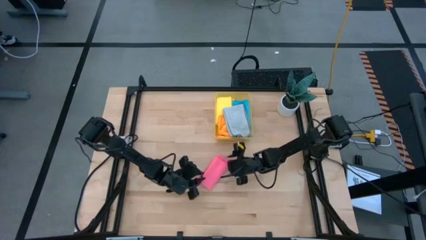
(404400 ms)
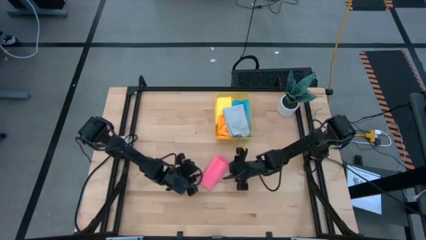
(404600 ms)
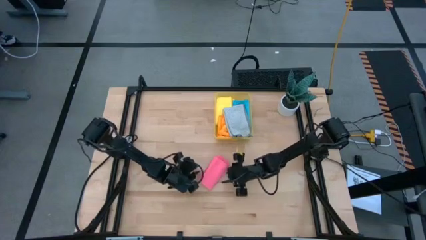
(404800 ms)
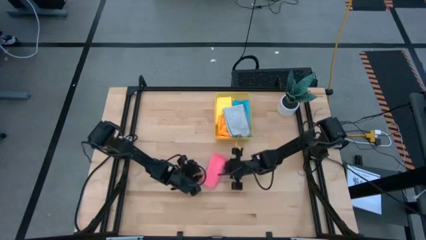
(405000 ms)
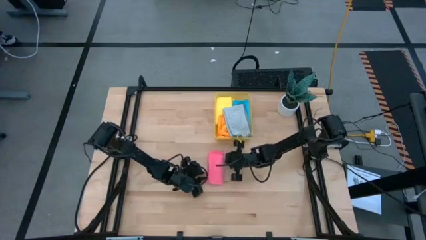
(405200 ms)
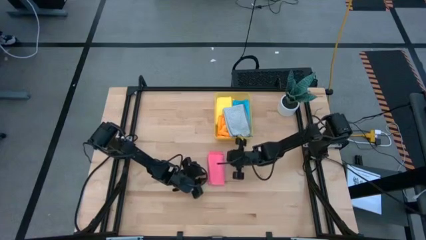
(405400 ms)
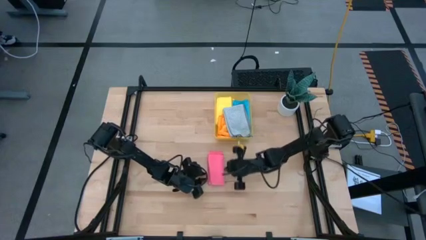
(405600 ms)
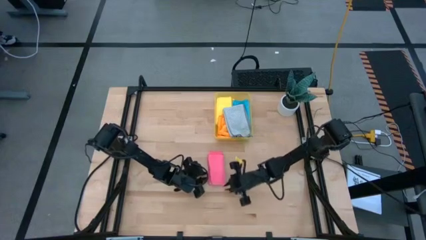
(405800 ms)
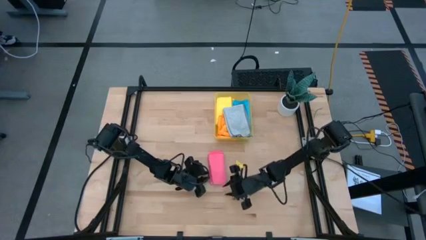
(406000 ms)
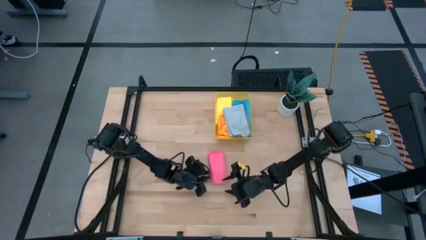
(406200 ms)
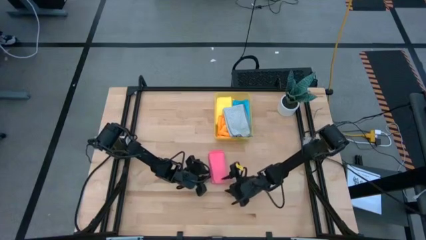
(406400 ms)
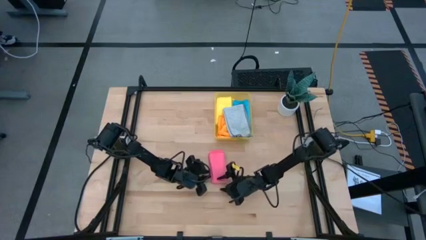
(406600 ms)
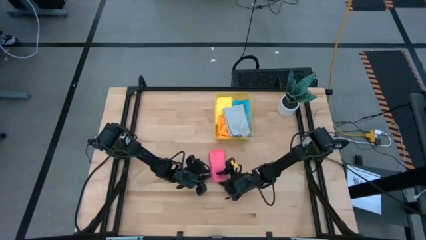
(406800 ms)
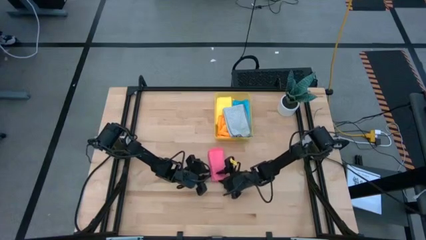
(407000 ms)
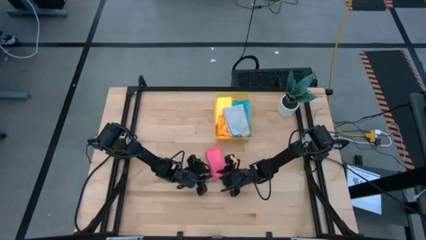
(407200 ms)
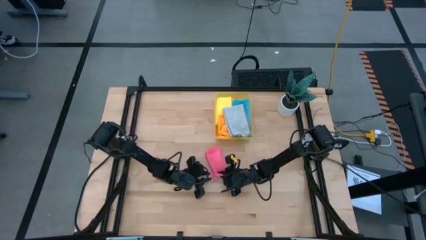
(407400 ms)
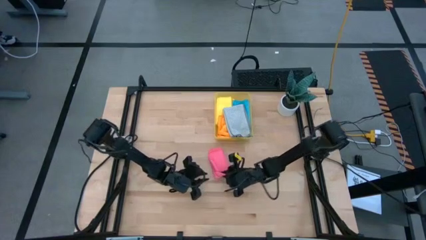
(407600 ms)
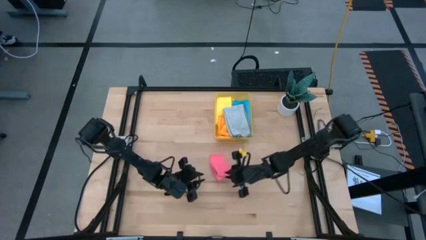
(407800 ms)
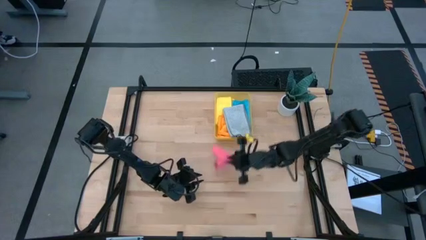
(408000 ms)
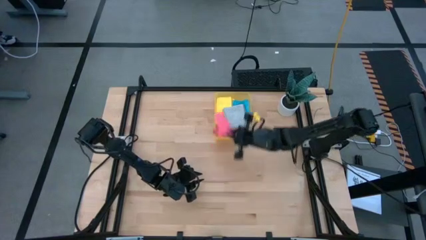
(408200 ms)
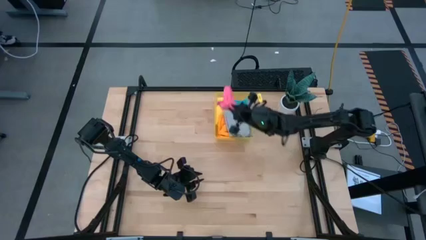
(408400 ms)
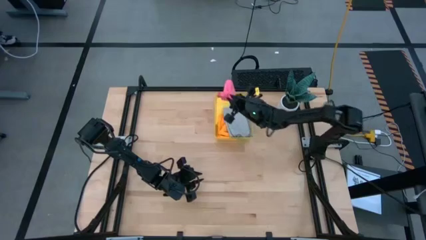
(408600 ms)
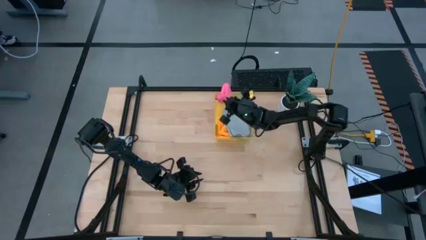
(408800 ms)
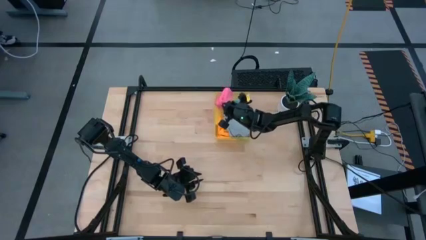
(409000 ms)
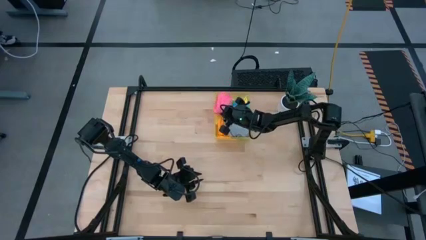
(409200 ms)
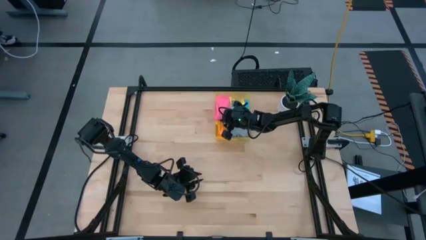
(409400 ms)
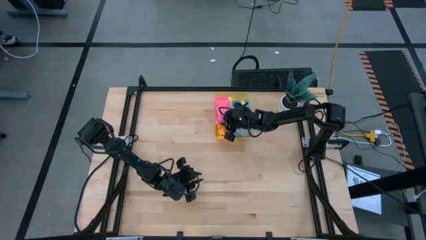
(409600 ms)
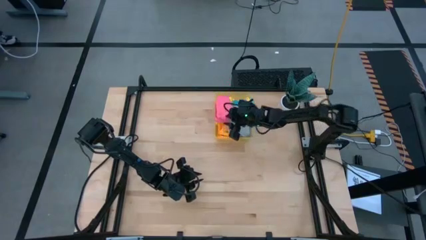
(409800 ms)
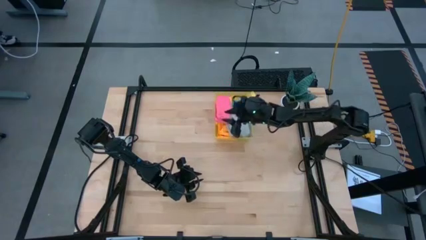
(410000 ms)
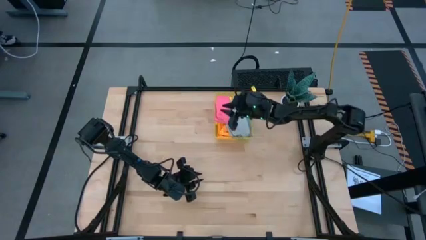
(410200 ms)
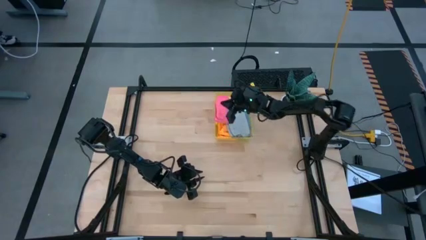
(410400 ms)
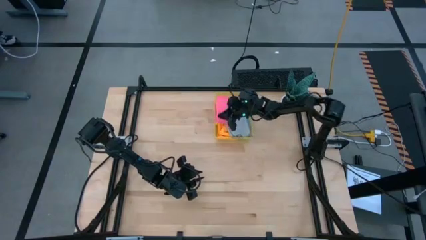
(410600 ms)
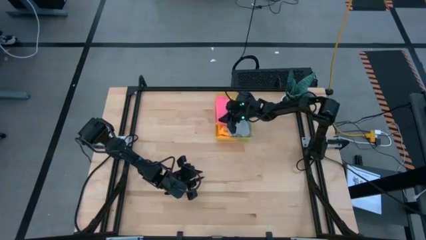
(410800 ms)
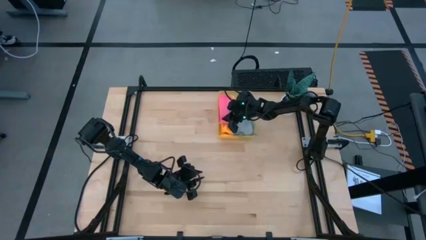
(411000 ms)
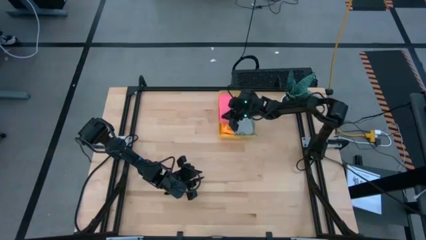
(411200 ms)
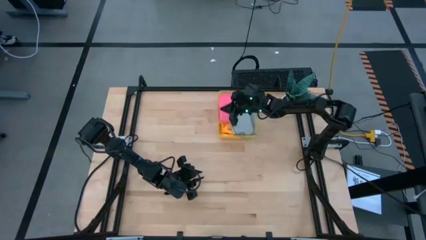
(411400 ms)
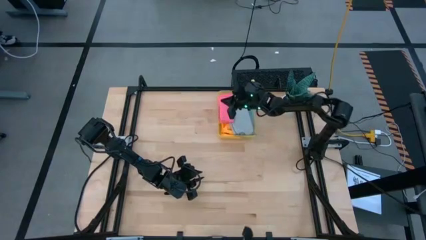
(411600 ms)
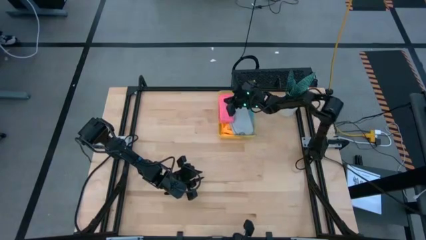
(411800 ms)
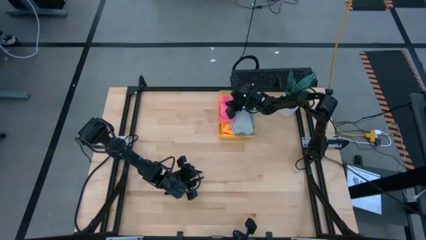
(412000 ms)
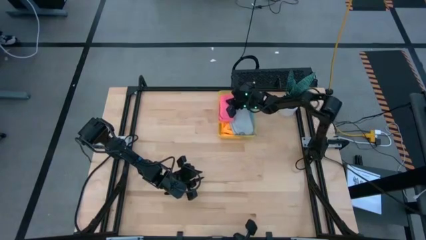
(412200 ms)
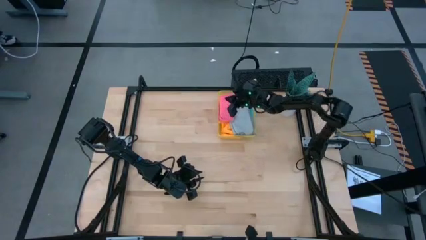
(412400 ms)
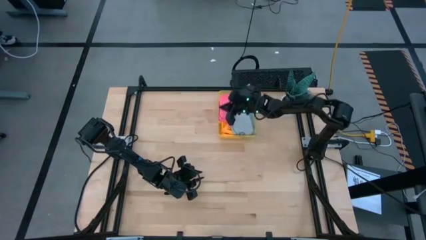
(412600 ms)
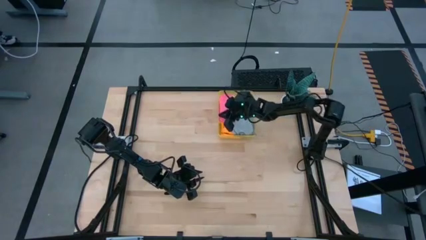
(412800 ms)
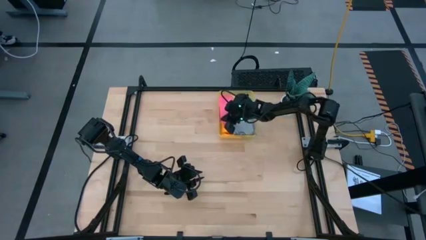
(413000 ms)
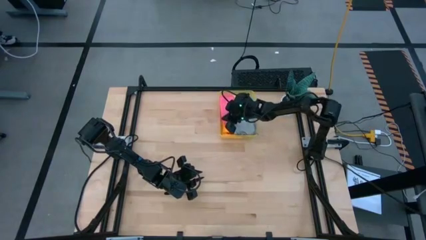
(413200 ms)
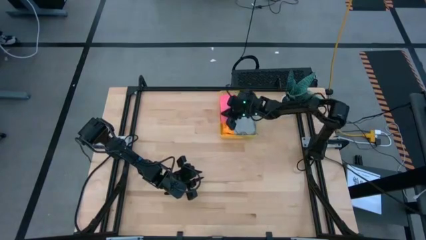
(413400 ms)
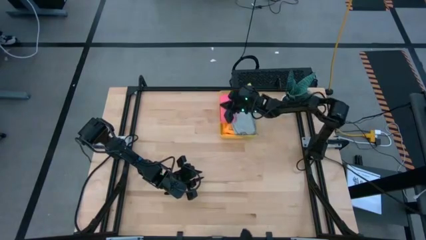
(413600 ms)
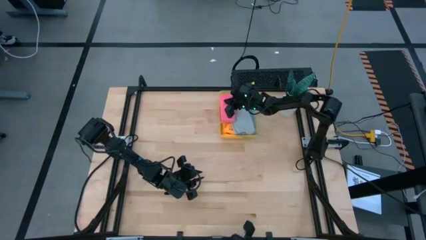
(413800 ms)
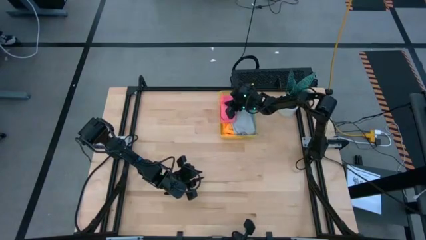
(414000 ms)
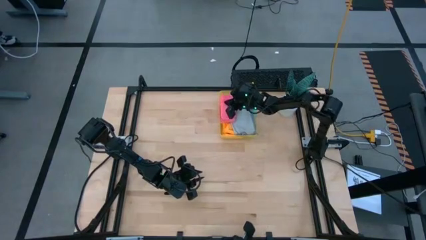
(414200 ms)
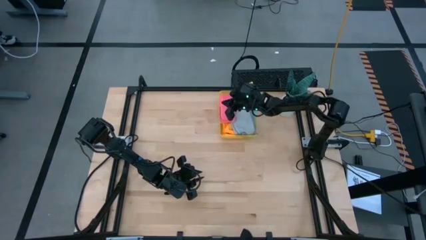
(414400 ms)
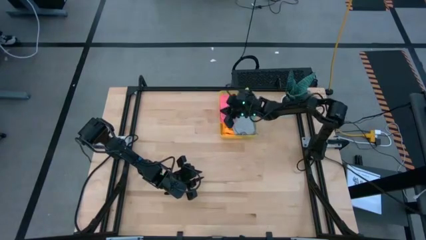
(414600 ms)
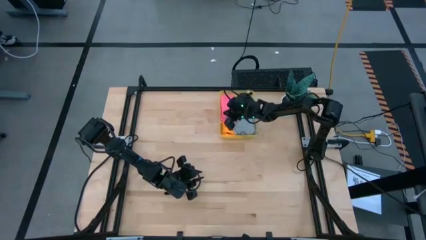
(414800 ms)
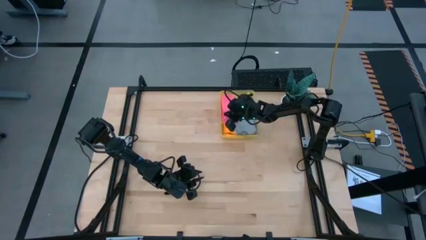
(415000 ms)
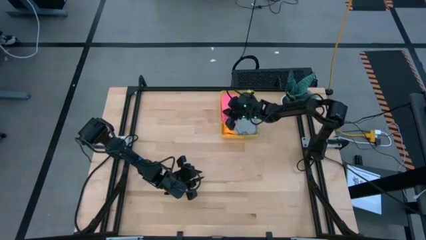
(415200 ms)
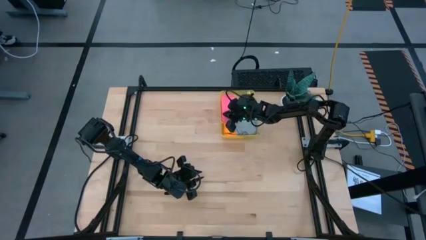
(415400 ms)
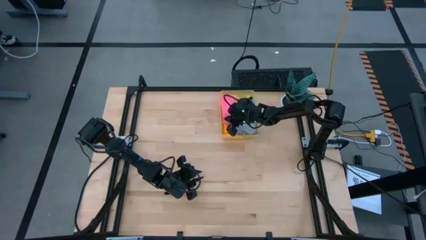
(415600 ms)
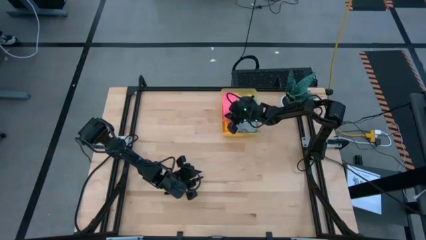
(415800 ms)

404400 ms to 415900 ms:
Task: Fold microfiber towels
Put the folded pink microfiber towel into the yellow bin

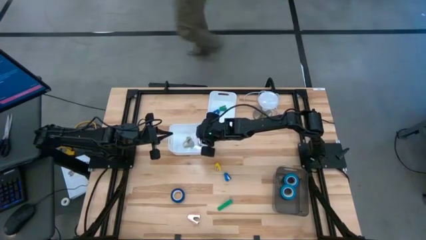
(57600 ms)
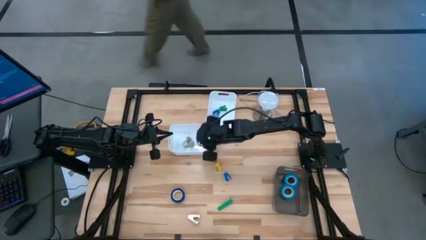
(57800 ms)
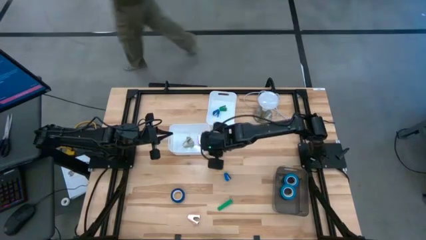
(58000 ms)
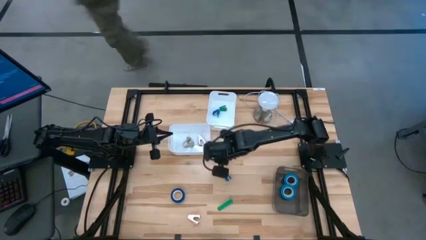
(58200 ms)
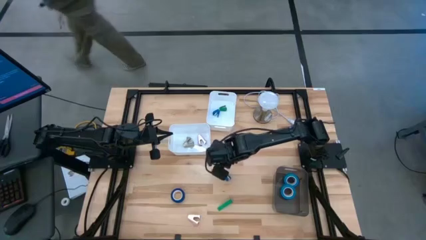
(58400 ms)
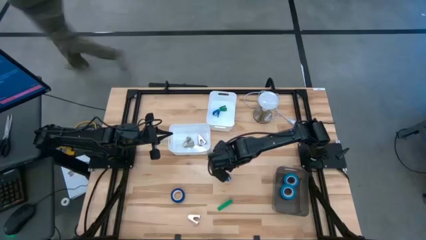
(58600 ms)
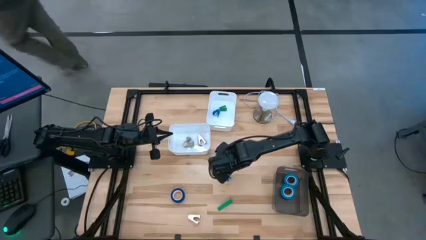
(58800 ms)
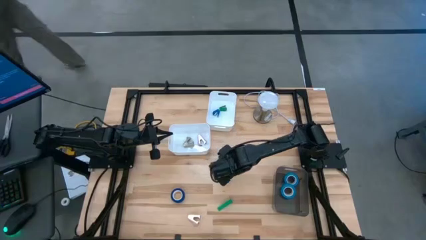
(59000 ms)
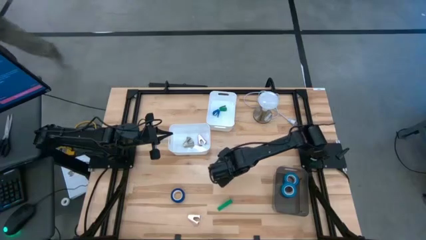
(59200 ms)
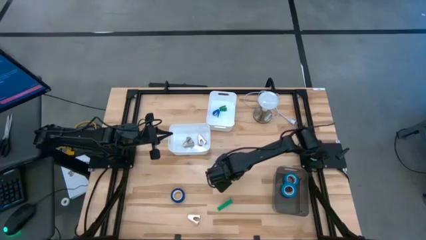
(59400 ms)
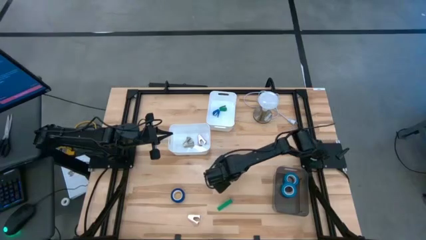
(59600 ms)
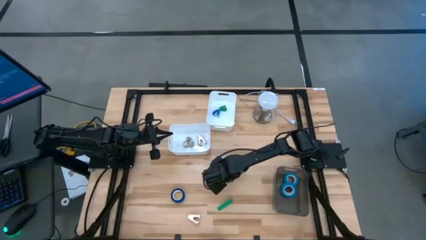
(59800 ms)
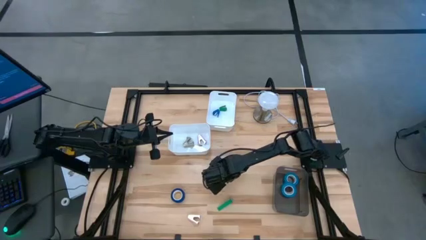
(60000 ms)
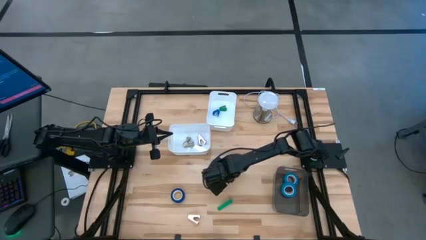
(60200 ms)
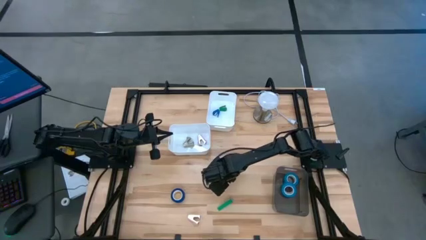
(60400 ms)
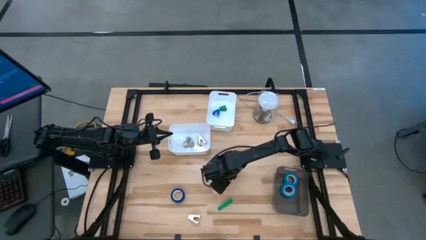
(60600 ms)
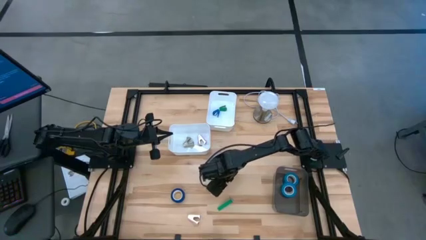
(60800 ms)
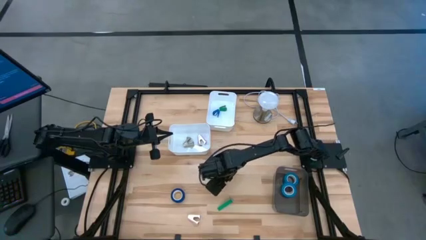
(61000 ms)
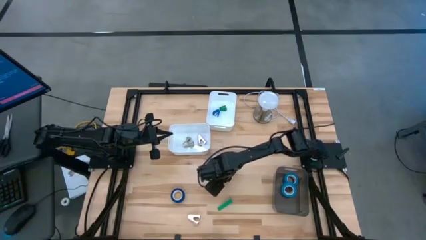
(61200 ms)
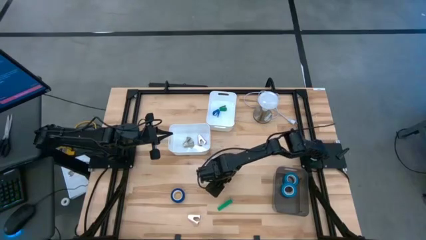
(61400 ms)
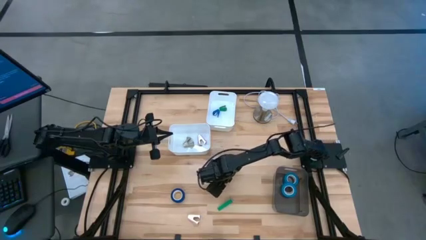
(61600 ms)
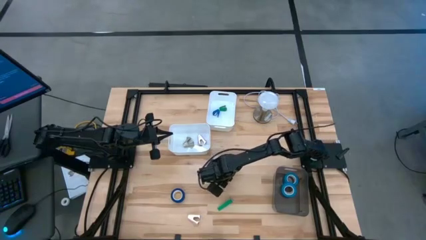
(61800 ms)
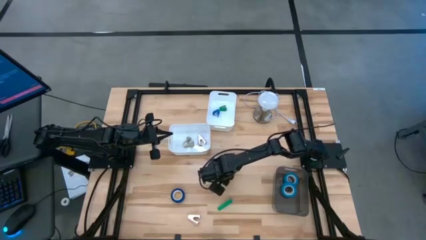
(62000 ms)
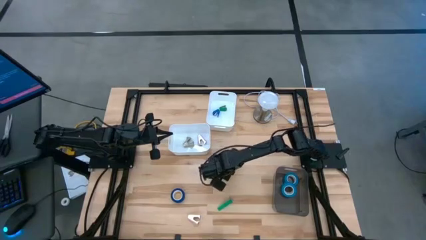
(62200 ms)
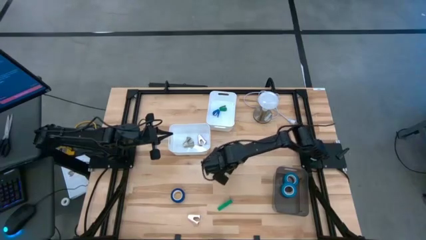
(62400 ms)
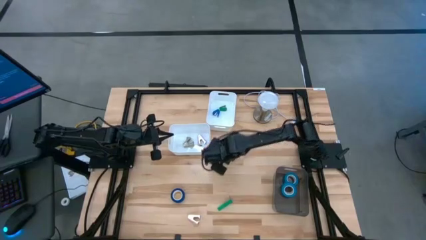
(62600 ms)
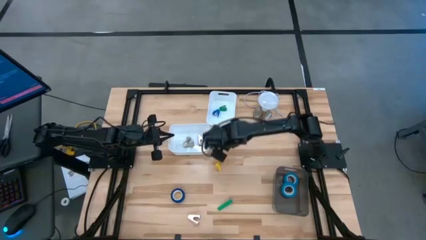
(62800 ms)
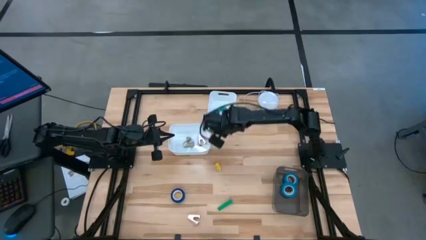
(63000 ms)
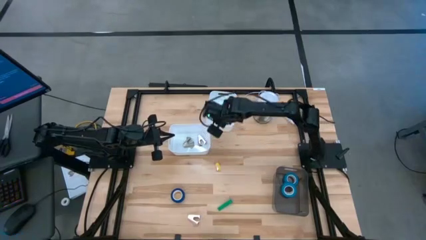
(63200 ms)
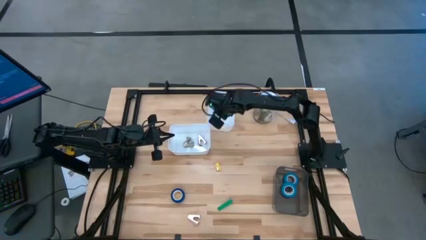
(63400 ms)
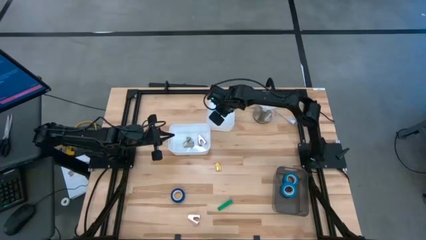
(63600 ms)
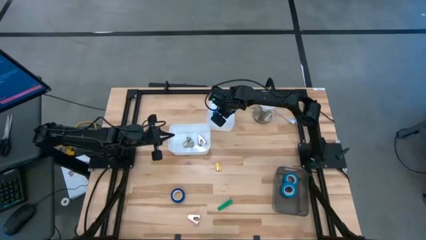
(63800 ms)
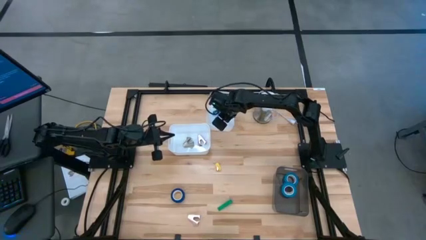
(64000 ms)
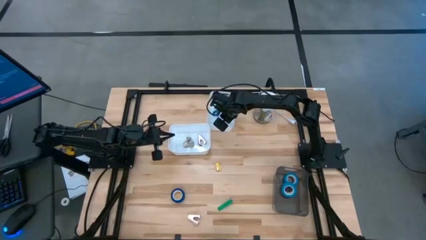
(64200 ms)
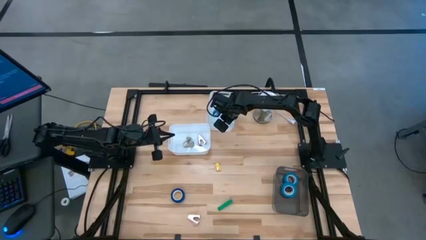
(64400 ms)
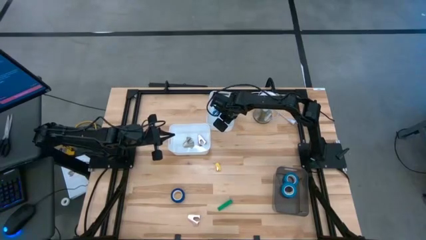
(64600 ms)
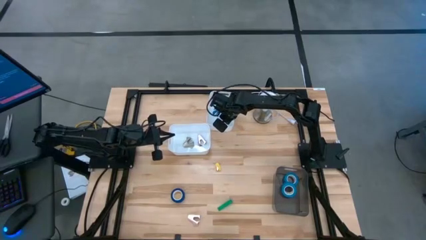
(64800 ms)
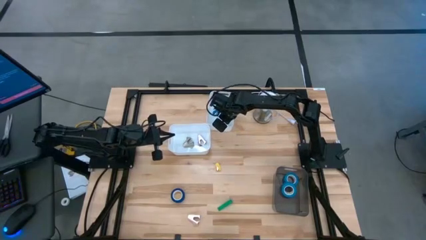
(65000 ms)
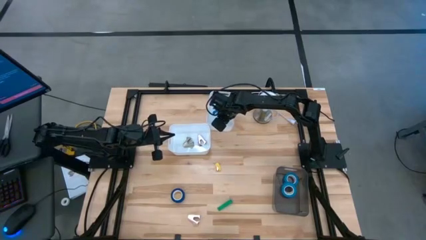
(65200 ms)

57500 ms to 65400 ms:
Task: Pick and place Stapler, Stapler remover, tape
Put the blue stapler into the top white bin
